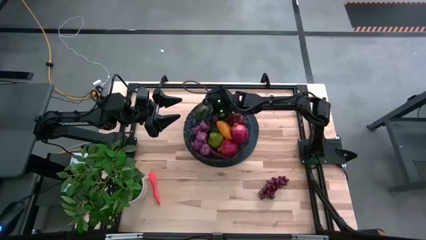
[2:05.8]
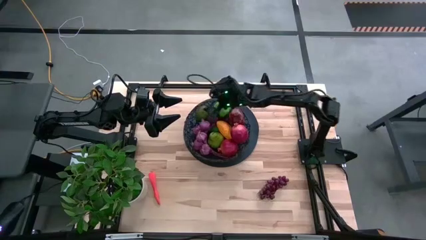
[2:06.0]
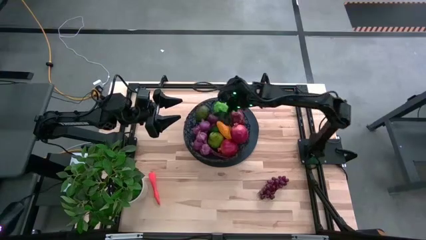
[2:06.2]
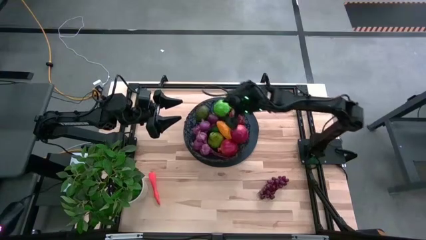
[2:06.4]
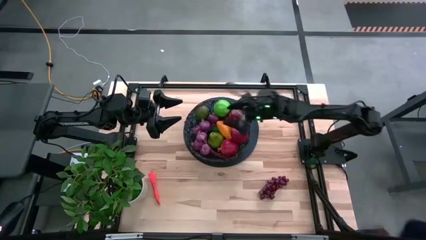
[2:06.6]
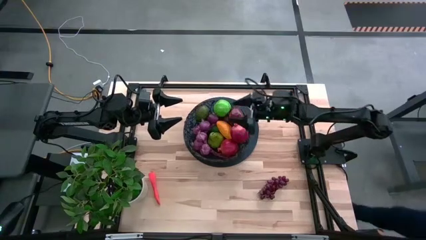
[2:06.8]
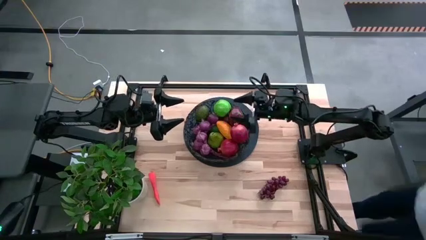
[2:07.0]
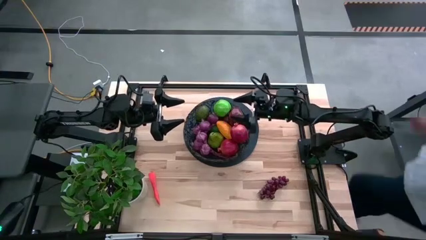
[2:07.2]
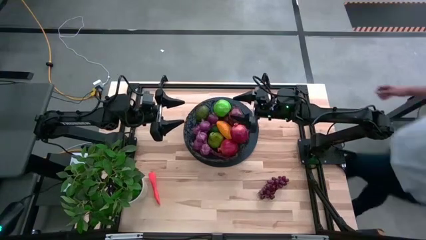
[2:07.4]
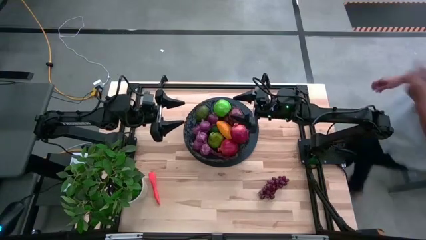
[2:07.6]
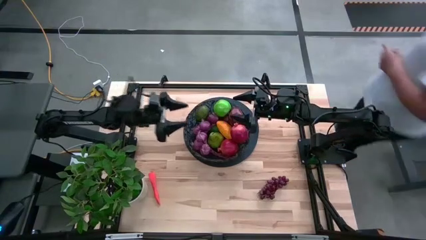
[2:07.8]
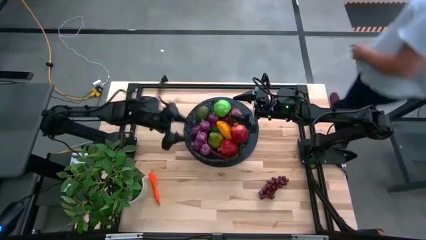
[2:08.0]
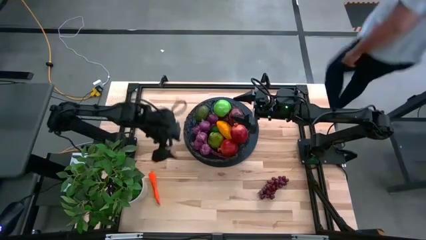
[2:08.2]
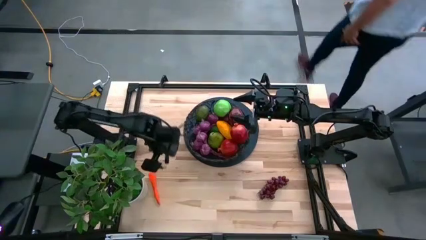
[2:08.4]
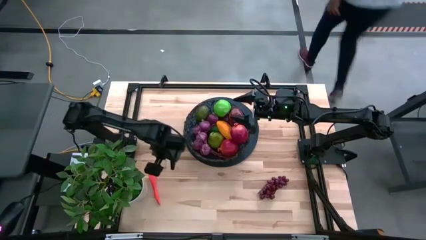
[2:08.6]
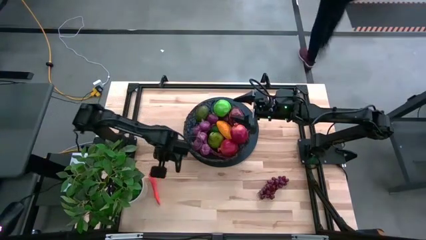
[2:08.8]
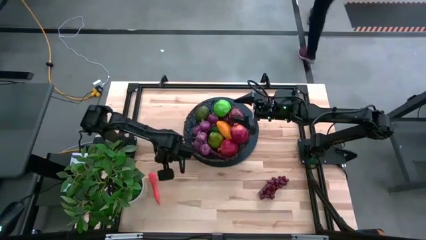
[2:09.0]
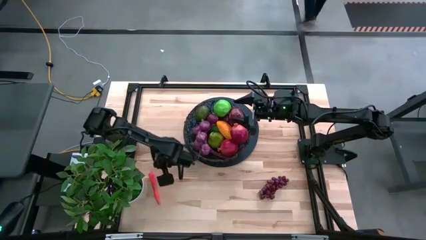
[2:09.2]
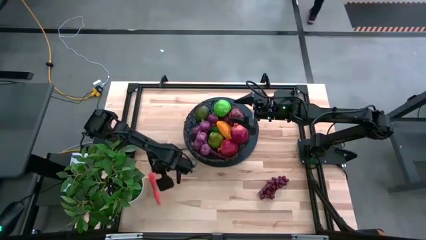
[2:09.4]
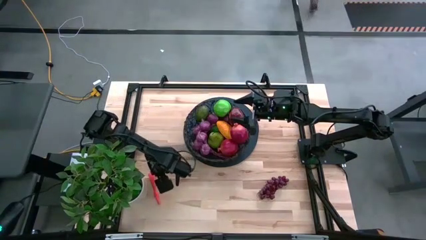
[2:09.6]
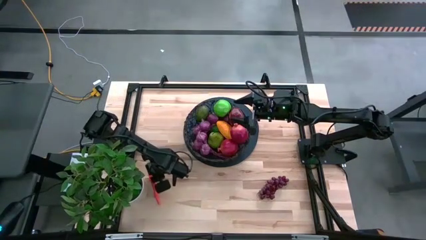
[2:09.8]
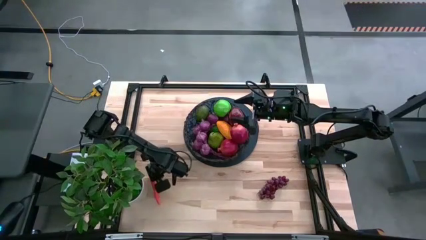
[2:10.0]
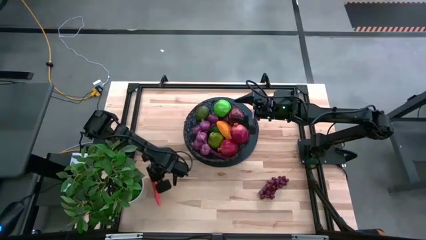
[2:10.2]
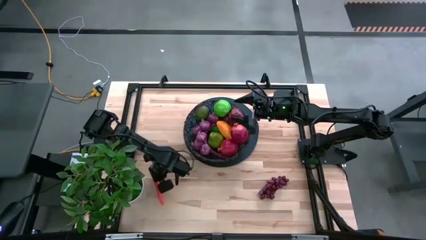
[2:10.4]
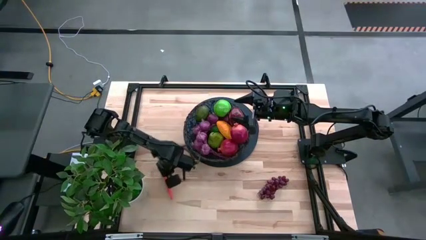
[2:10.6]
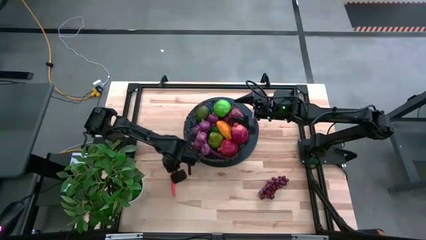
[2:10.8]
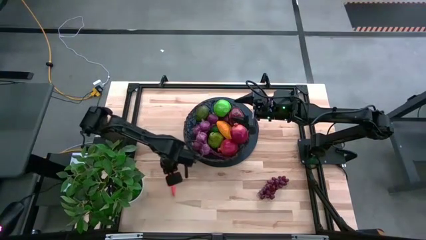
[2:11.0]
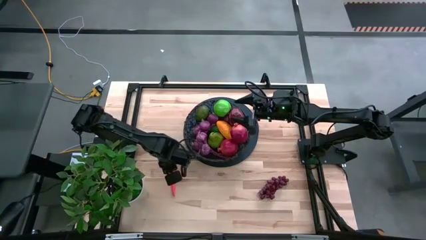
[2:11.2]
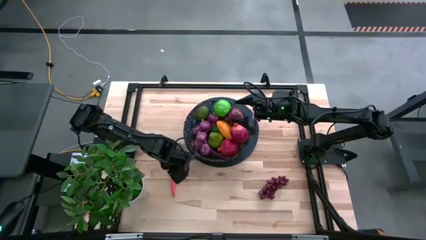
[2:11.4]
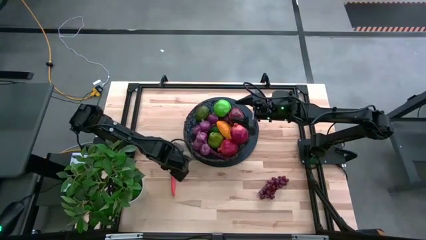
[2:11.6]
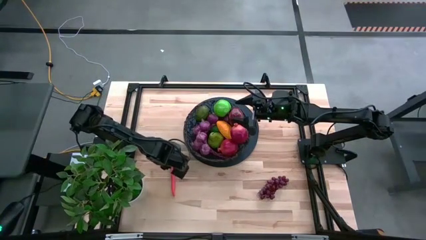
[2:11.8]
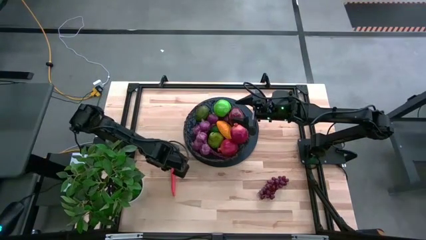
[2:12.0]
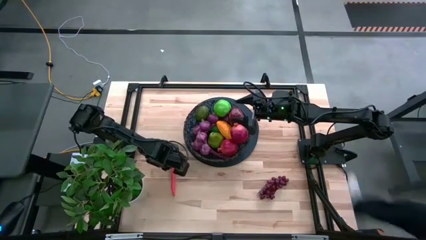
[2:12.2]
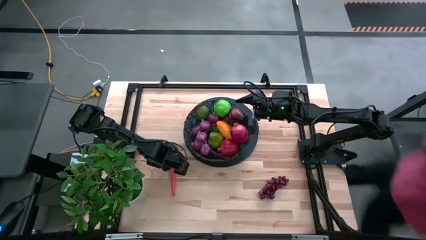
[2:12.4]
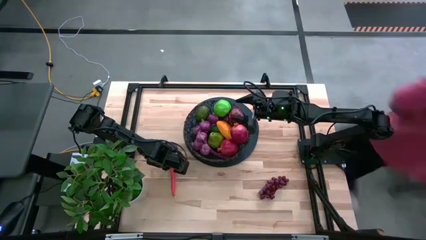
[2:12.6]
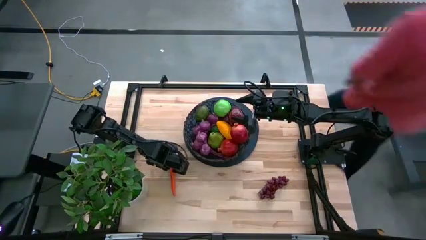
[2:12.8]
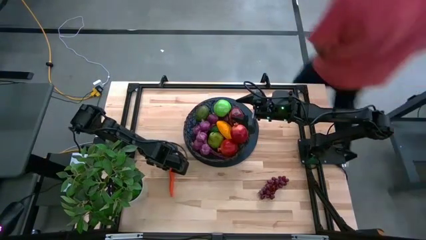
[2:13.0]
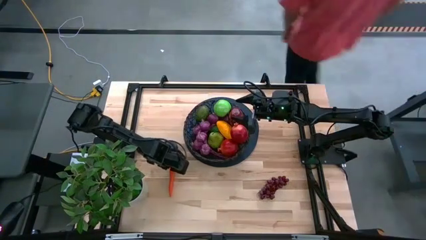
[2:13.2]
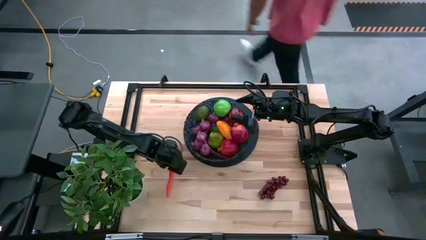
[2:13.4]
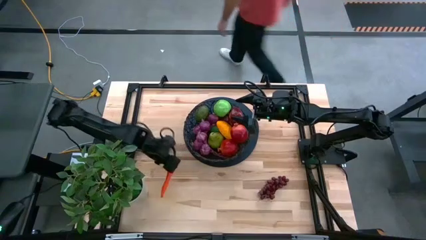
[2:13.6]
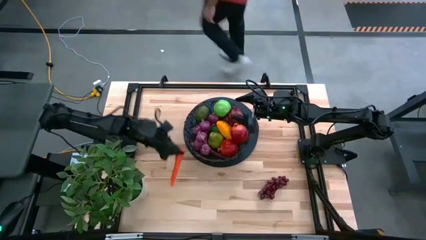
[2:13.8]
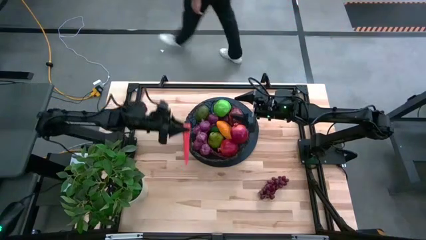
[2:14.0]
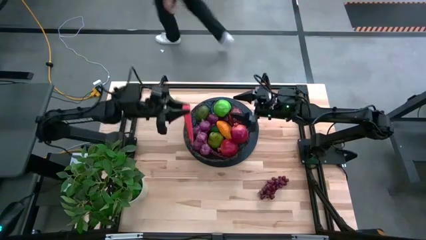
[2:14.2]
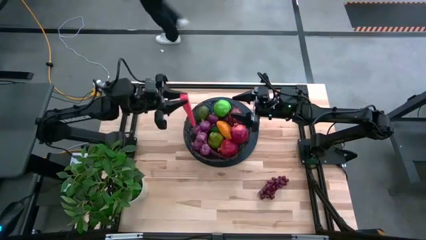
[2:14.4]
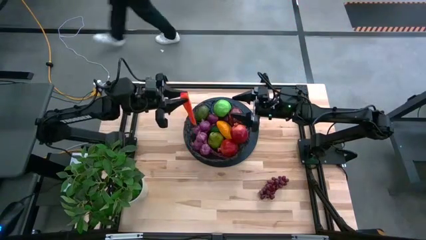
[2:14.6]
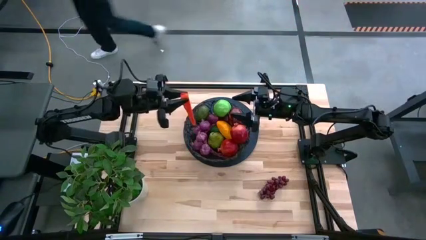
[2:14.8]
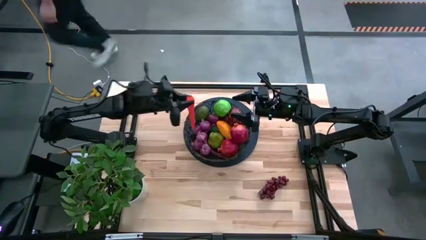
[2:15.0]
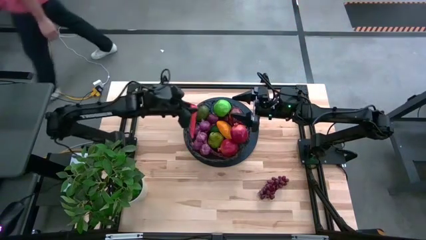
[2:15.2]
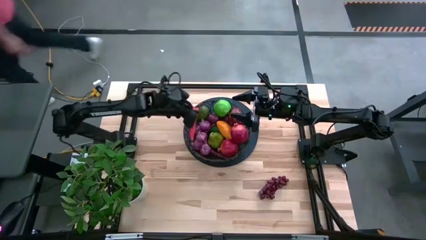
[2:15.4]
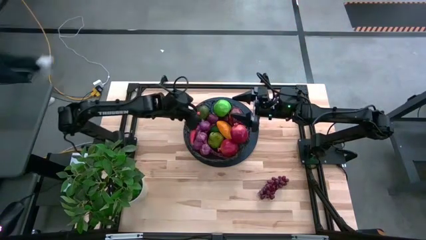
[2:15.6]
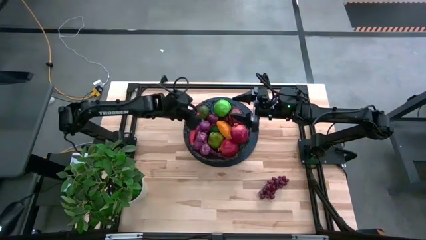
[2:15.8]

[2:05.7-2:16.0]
Task: Build produce basket
Put the orange carrot into basket

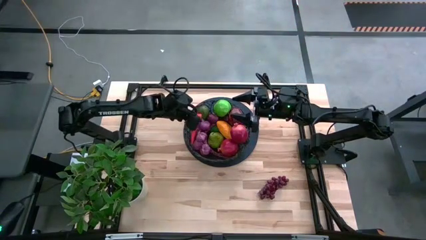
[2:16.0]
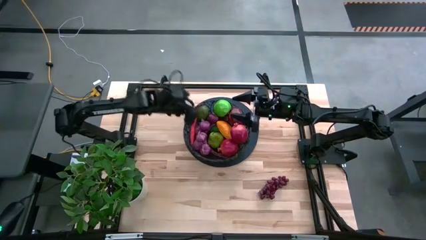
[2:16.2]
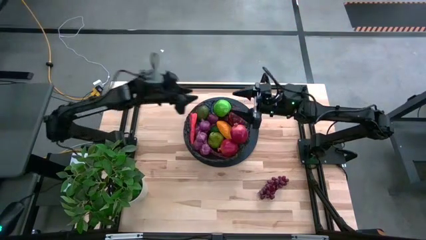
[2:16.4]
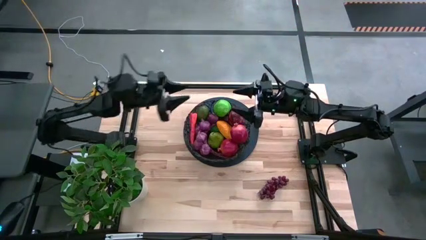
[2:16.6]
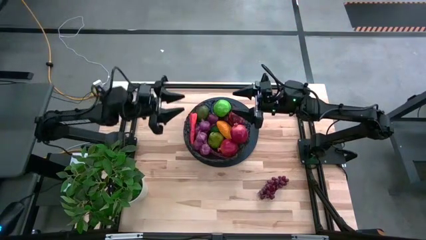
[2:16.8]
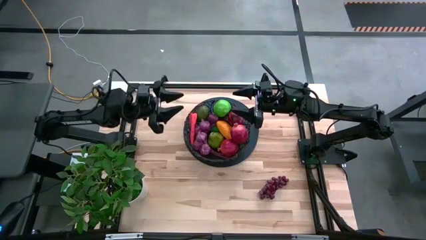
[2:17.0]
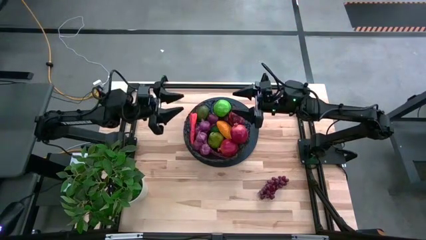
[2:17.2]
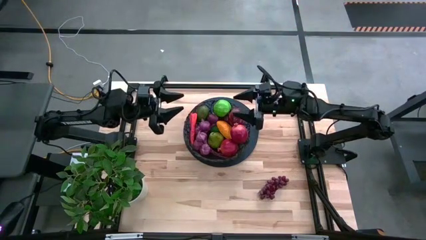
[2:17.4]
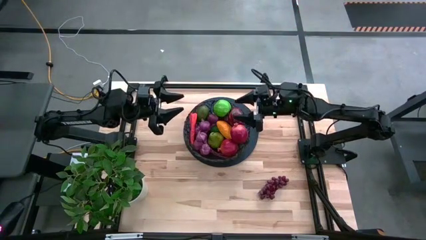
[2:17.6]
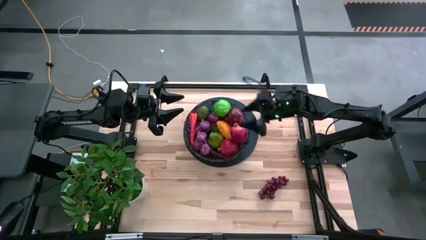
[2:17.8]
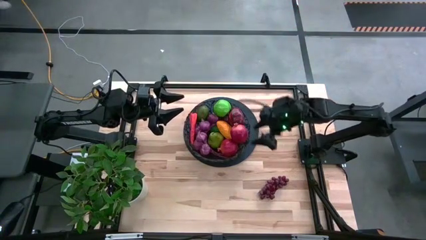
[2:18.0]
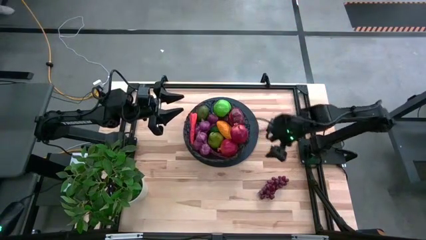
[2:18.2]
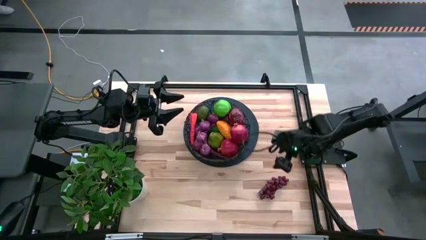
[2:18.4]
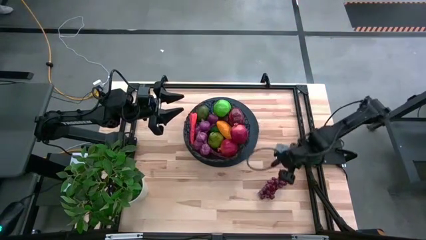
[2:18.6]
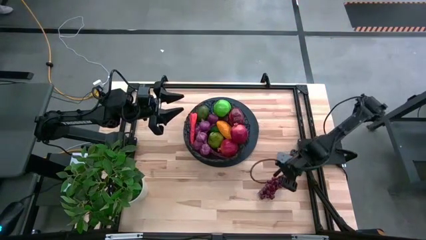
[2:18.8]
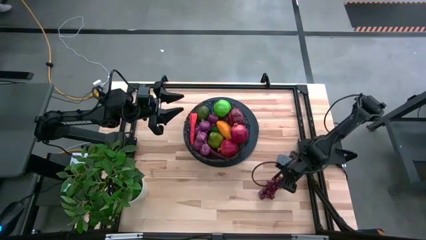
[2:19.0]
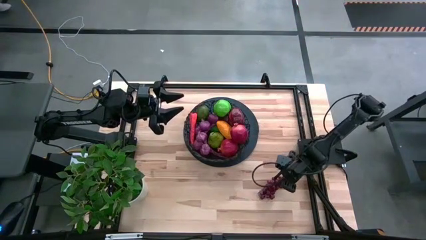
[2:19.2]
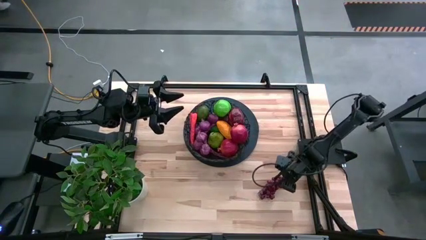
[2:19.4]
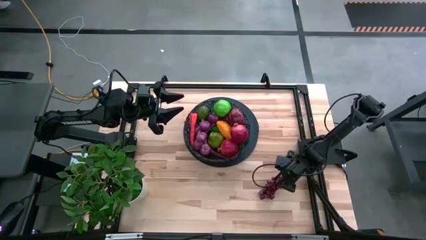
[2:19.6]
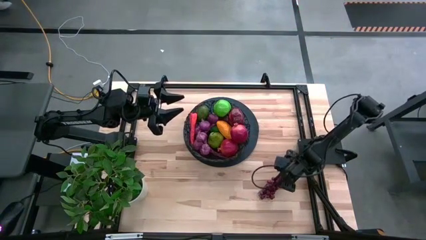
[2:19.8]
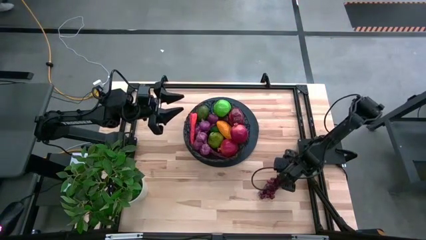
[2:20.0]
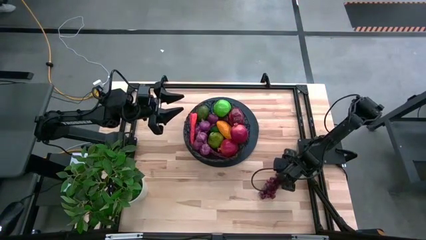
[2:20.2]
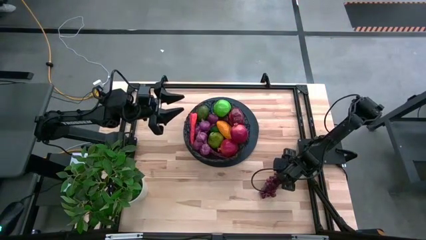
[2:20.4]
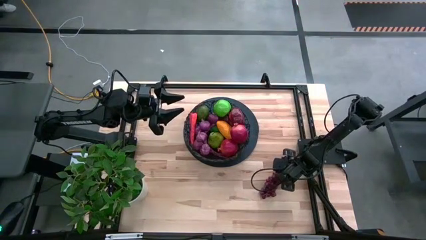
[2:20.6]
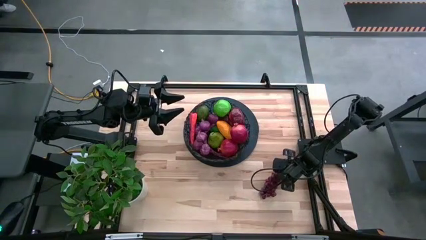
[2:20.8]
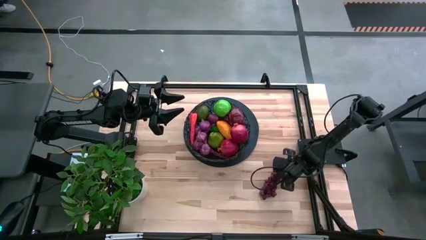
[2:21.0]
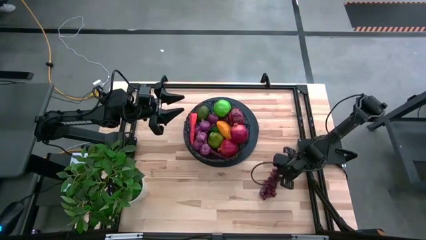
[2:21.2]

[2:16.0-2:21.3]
Put the violet grapes into basket
